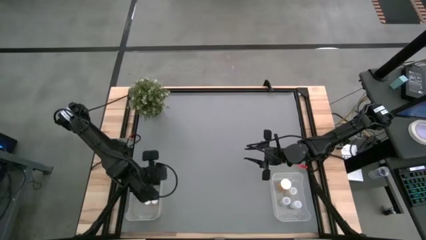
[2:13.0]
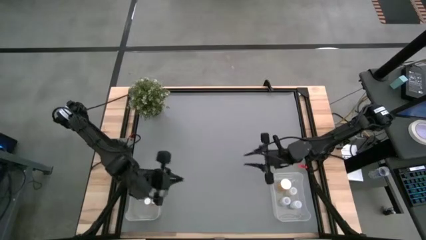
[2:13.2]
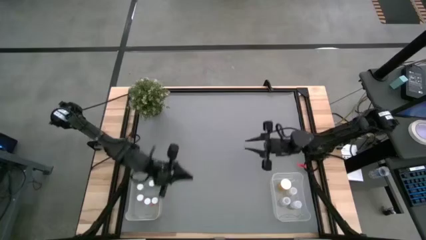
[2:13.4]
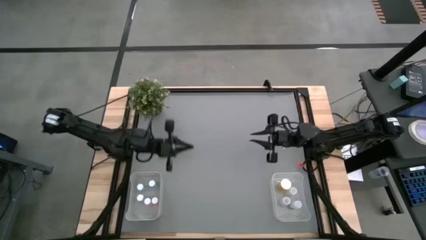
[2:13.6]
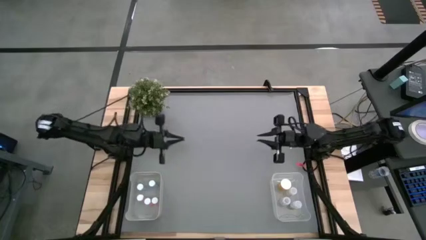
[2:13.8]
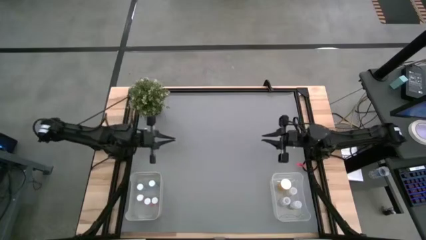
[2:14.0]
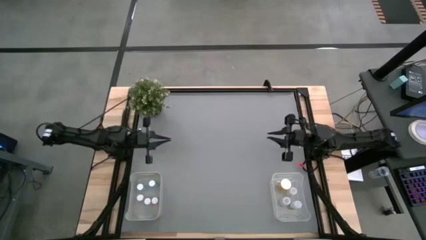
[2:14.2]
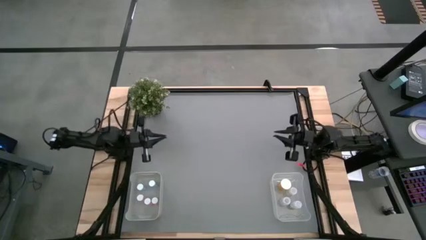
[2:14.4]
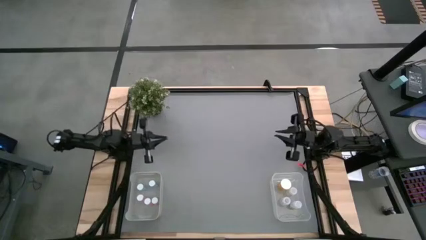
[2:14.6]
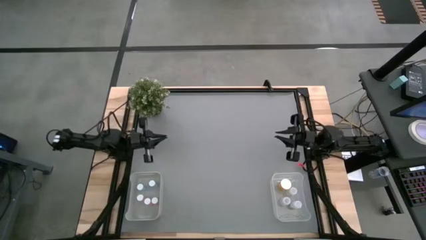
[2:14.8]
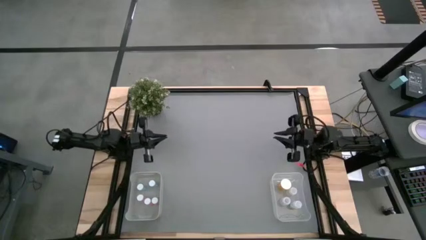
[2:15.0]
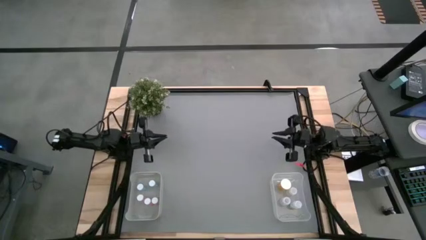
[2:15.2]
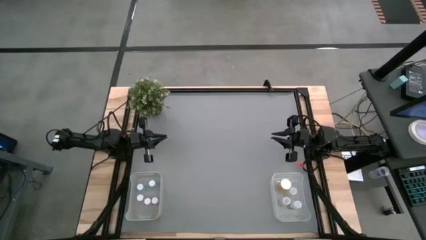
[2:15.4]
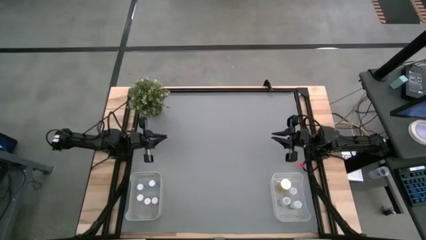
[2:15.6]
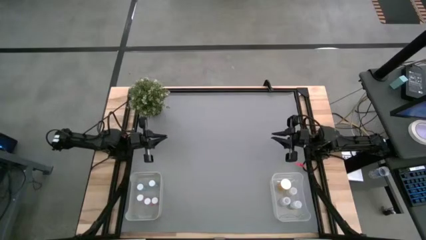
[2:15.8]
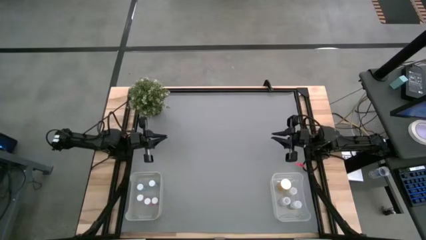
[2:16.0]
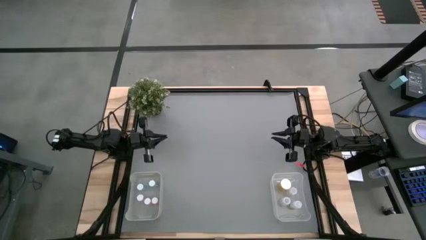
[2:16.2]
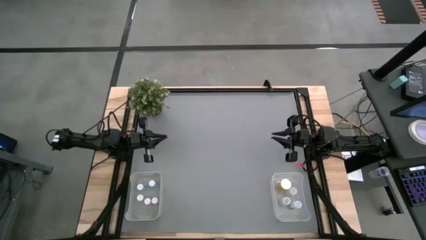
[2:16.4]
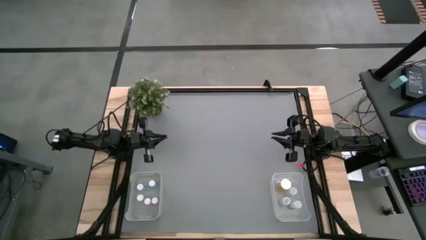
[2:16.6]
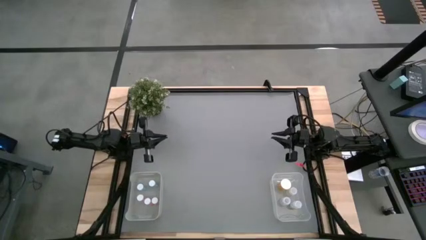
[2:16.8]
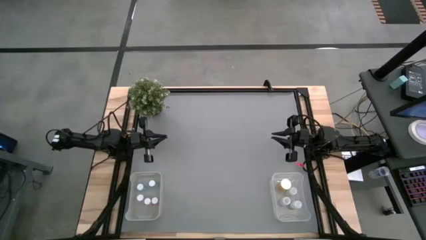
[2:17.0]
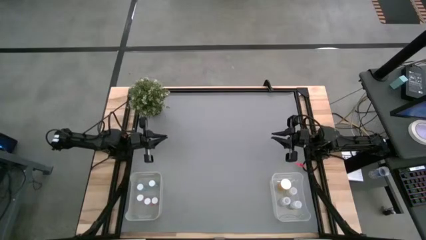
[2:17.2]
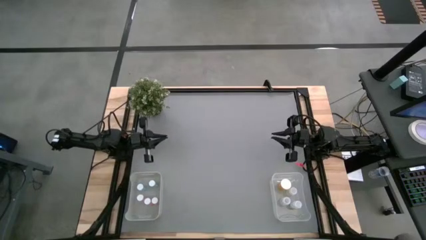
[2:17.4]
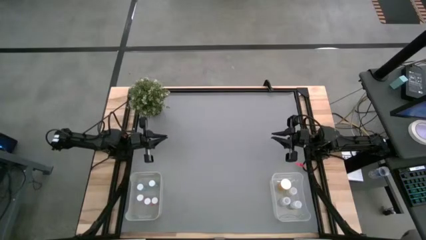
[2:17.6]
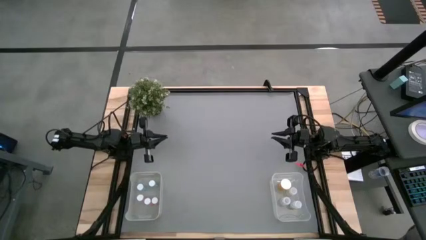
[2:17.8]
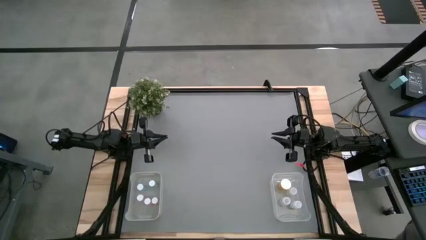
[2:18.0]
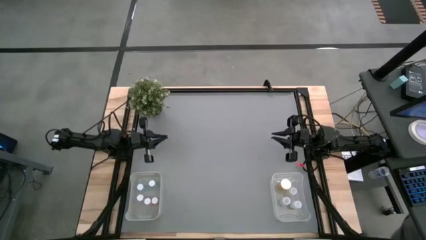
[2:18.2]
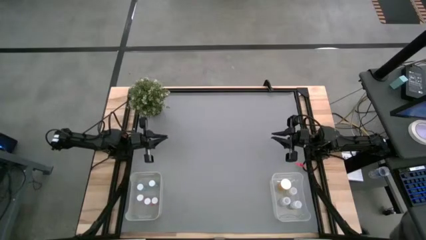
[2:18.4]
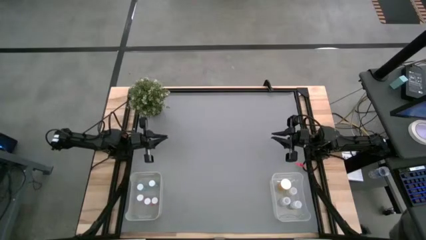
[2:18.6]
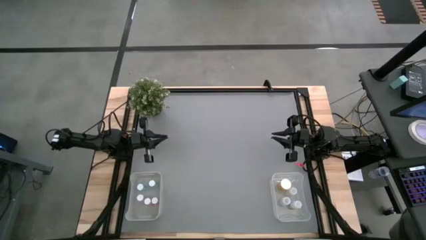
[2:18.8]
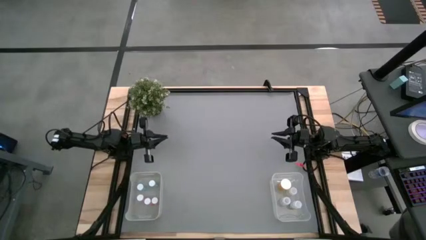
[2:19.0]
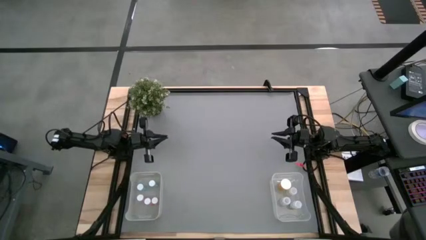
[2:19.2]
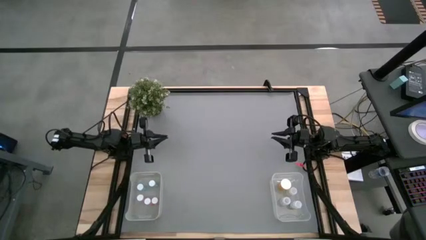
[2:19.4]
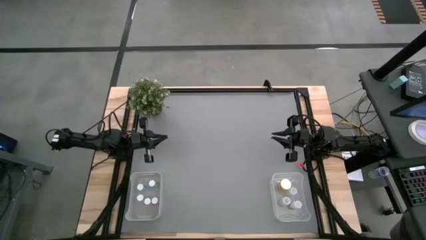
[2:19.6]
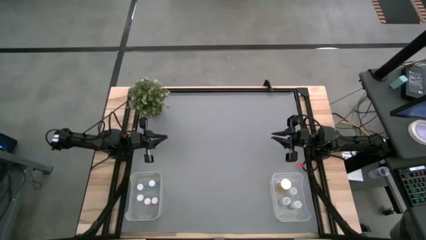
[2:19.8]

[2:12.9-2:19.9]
Task: Pick and place medicine bottles into bin by pill shape (circle, oval)
Return to Home Position

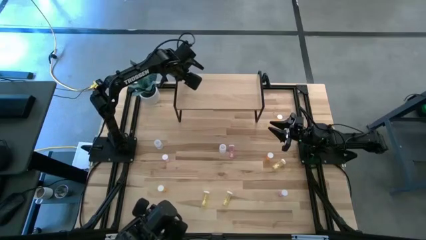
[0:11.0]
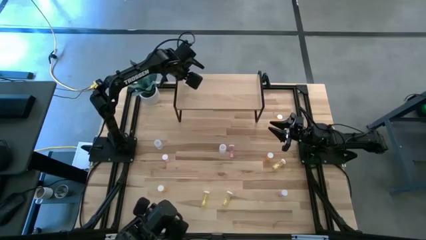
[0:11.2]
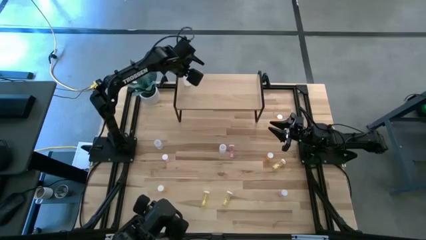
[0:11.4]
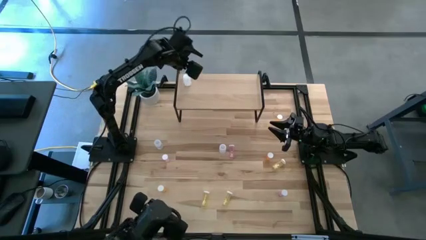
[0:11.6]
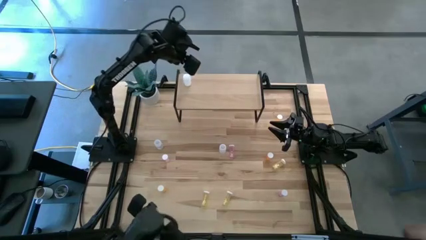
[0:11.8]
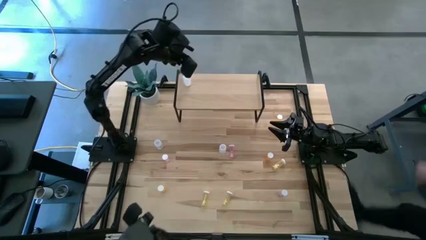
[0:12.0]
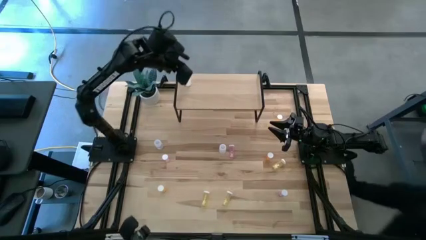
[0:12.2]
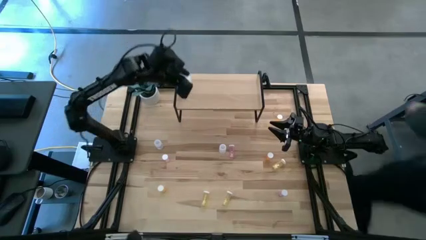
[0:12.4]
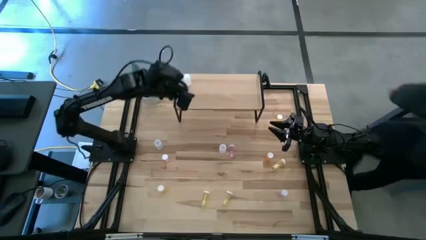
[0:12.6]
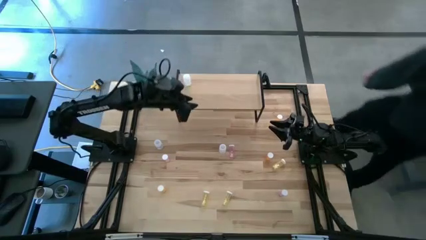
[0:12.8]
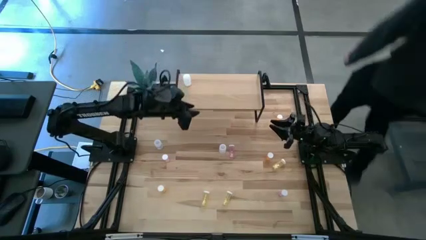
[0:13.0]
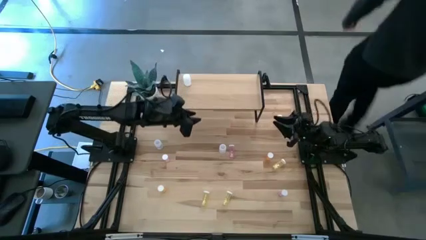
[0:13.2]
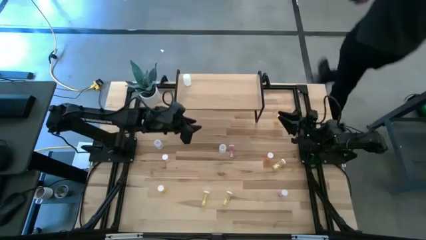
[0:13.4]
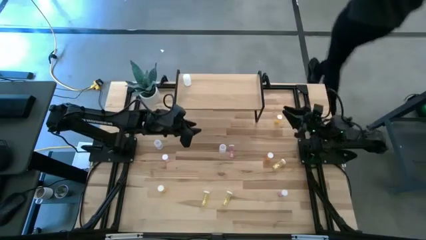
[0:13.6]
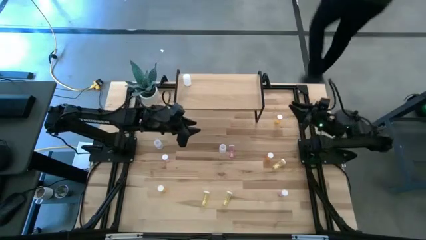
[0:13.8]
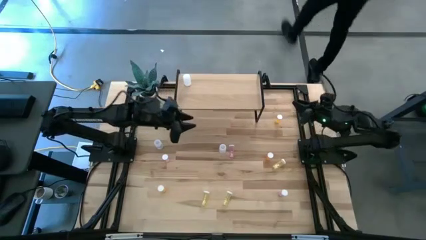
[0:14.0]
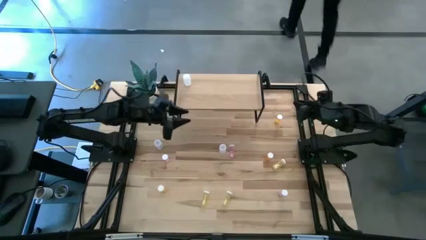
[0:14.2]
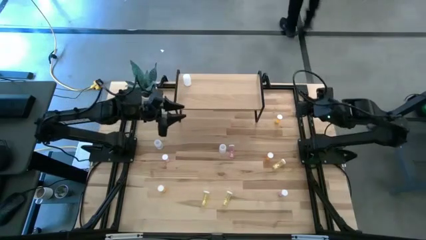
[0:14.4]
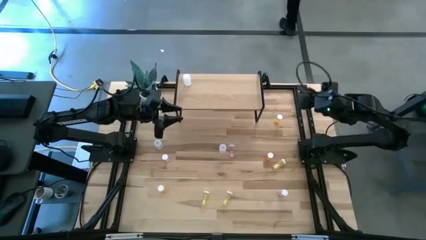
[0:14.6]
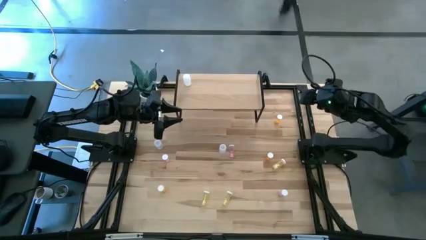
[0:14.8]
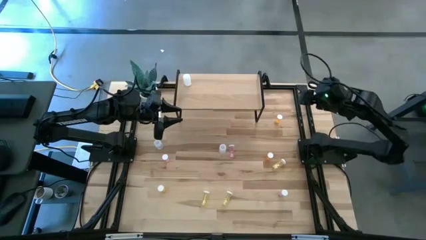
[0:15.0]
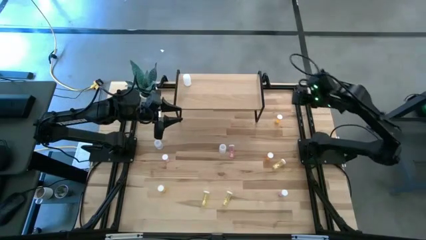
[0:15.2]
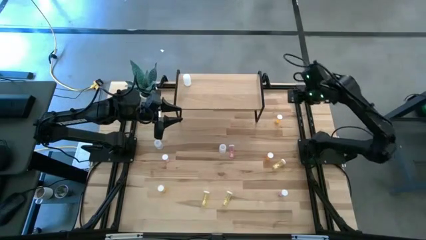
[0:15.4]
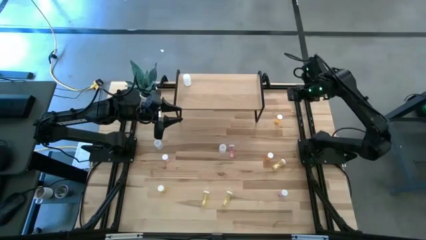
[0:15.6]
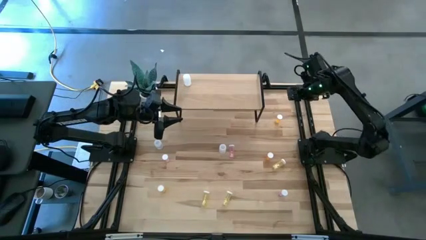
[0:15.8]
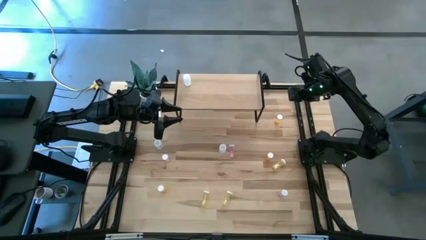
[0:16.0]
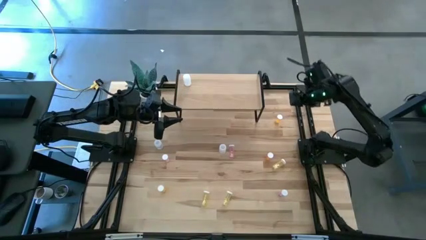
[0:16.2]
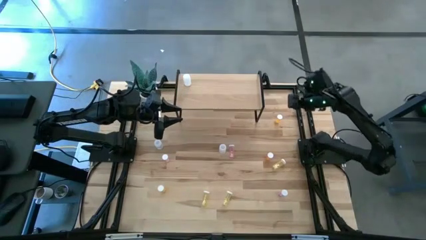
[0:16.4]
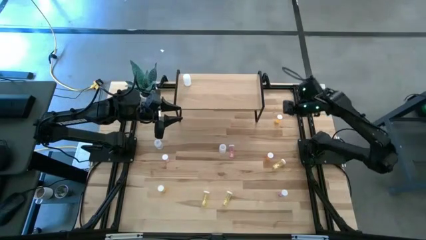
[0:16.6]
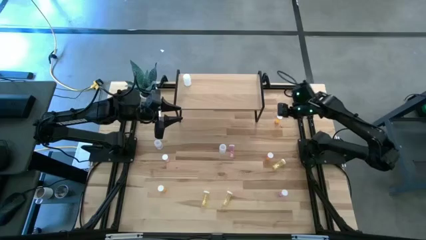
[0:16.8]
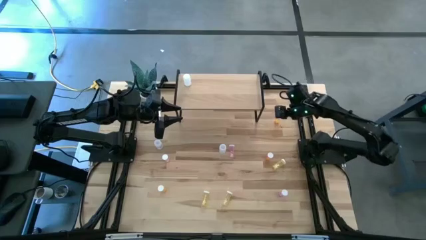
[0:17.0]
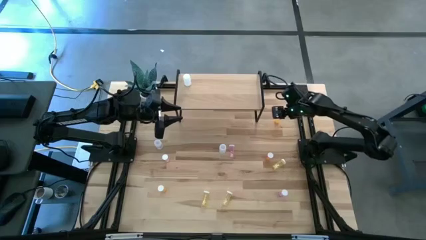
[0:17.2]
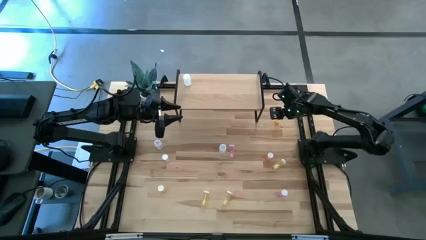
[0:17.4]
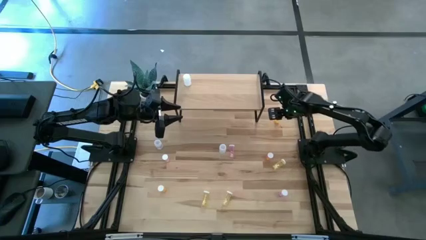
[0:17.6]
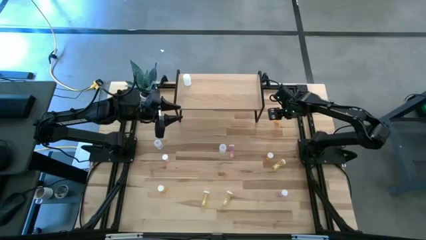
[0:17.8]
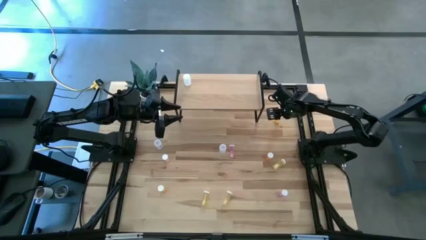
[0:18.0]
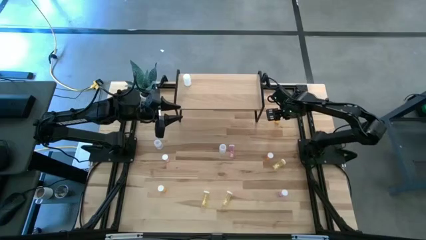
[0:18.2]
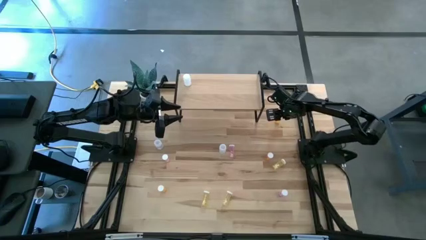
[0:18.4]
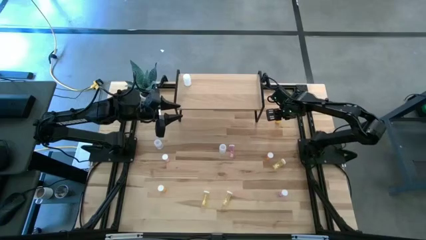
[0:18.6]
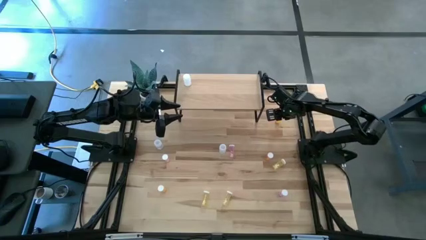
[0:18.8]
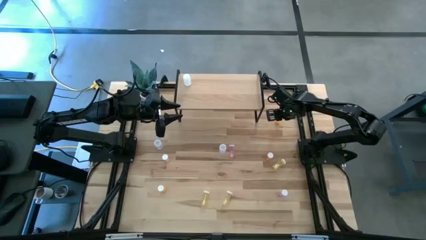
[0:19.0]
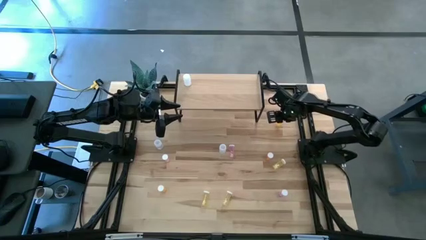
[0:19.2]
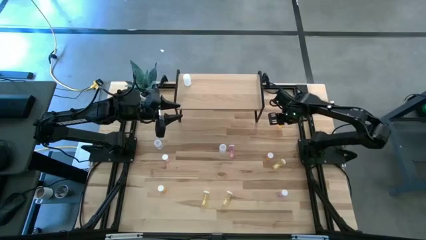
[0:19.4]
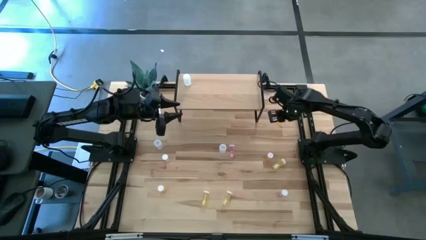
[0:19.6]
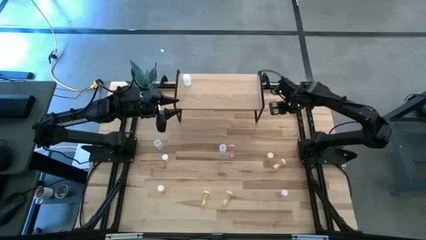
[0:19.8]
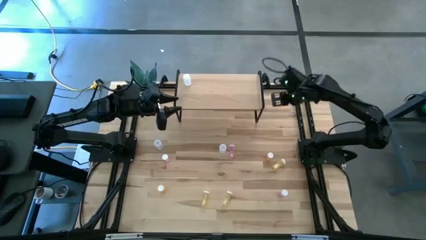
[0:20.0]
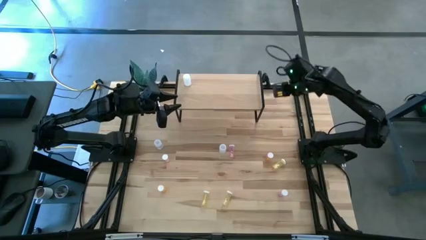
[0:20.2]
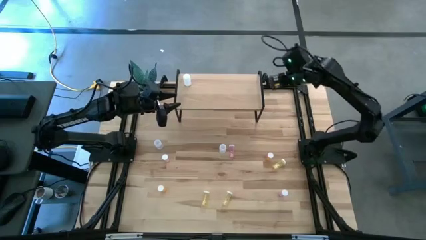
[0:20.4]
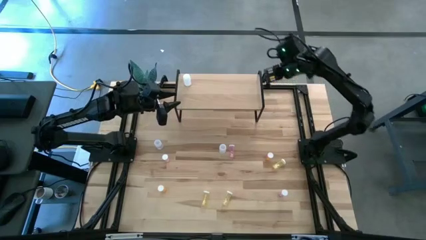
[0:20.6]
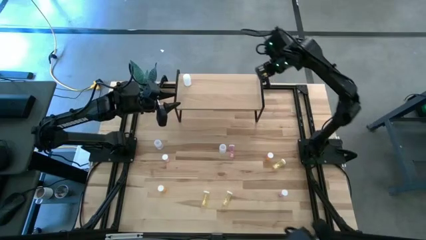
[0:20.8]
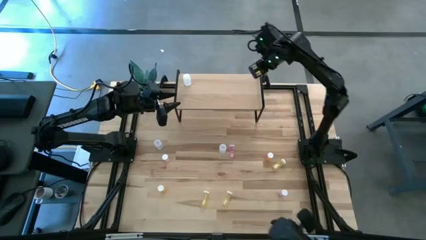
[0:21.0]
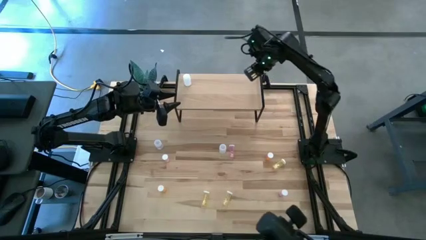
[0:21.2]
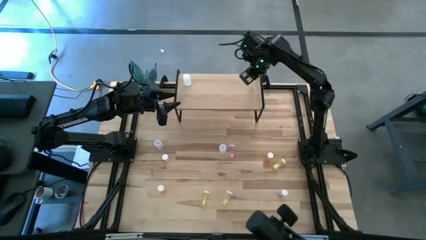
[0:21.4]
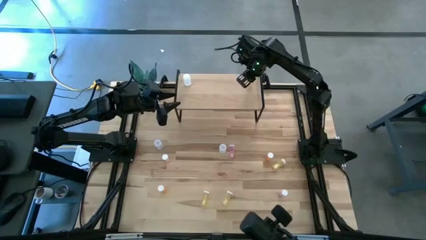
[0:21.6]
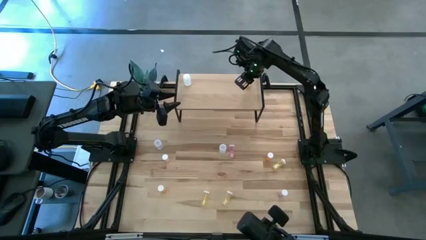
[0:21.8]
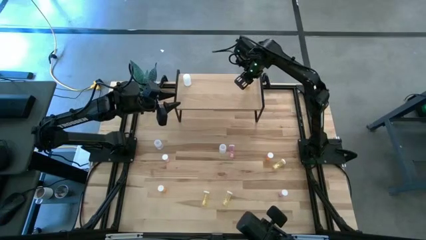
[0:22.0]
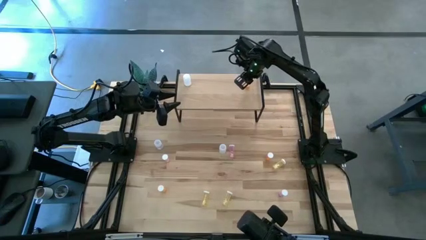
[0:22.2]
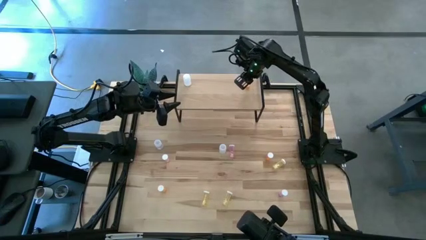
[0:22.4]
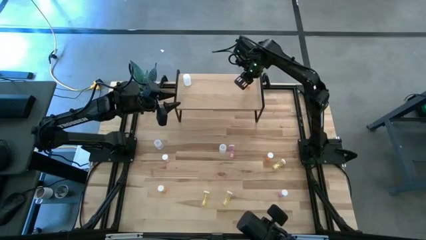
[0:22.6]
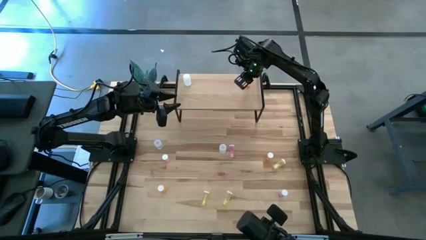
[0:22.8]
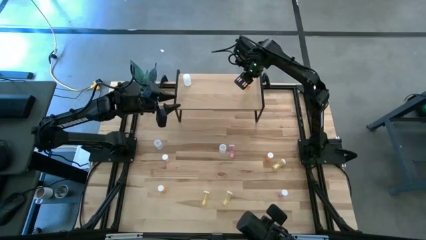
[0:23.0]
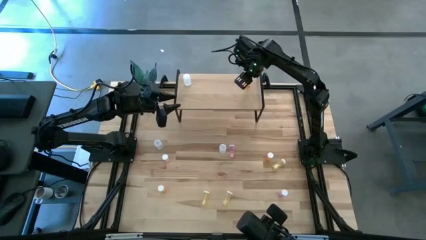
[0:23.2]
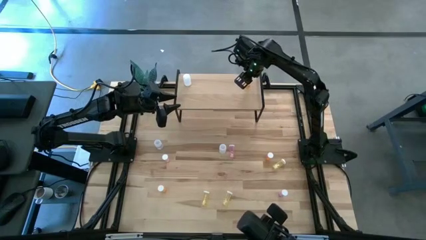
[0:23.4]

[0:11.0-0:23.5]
Task: Pick and place medicine bottles onto shelf by color
Put the top right orange pill bottle on the shelf
